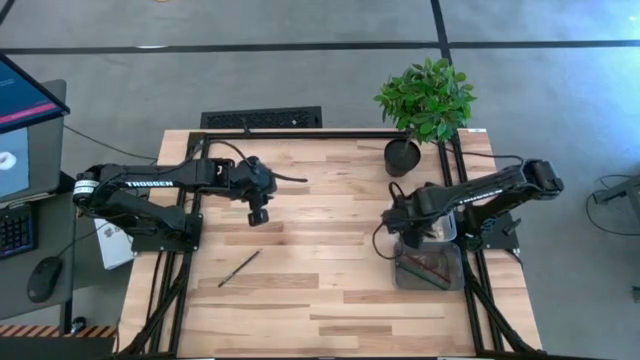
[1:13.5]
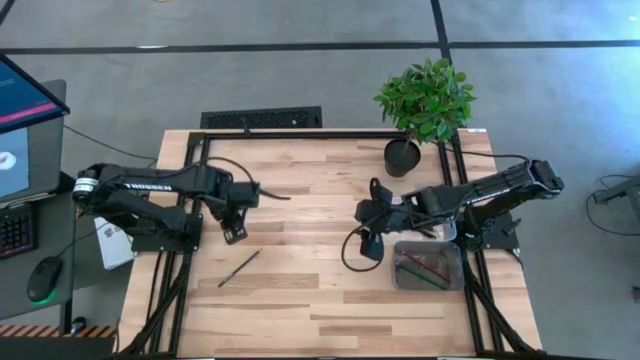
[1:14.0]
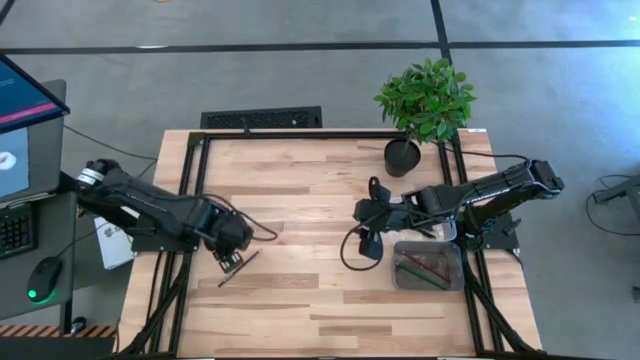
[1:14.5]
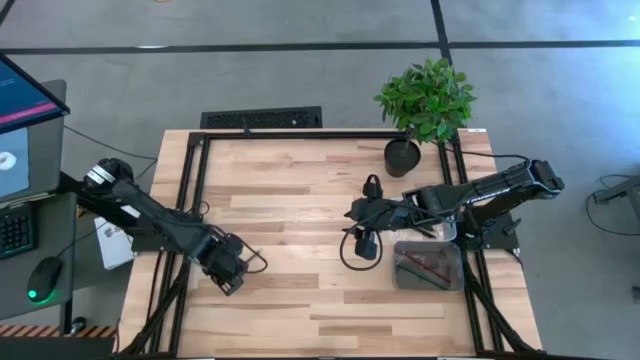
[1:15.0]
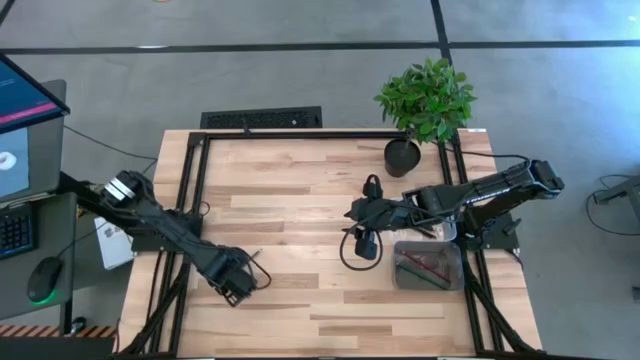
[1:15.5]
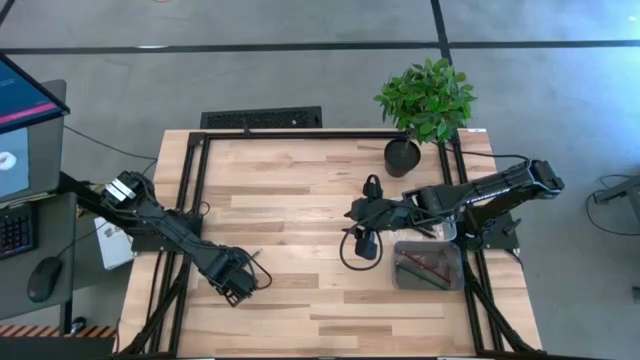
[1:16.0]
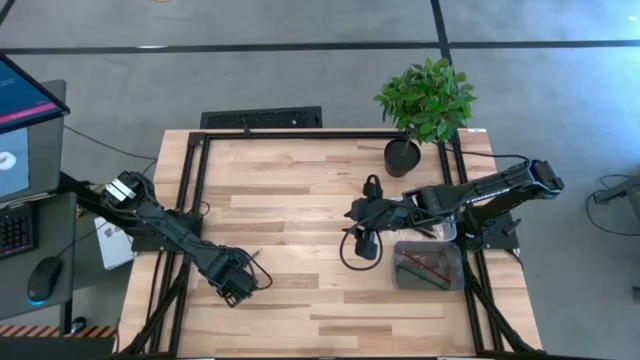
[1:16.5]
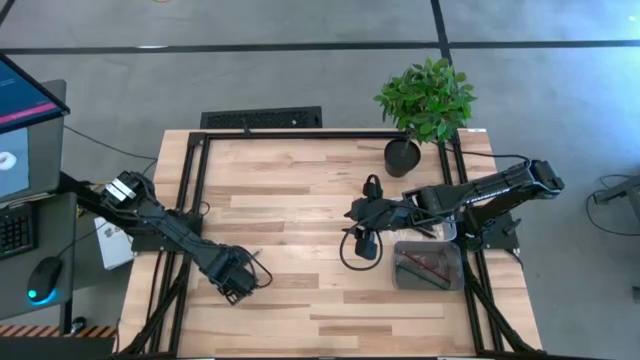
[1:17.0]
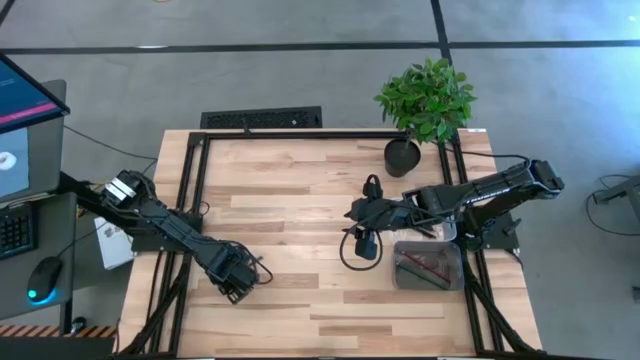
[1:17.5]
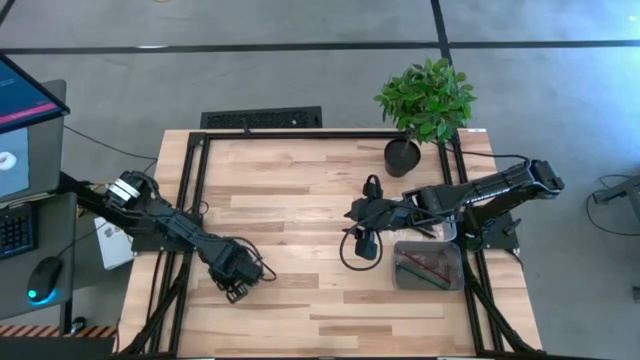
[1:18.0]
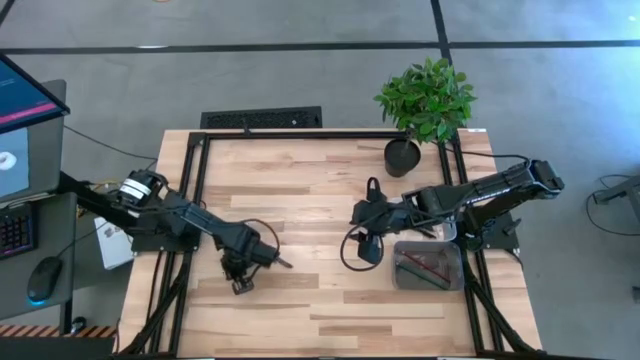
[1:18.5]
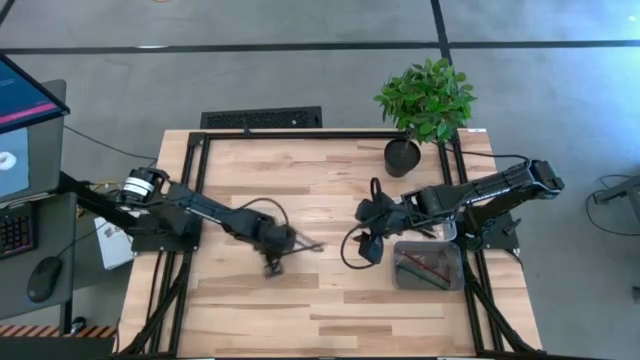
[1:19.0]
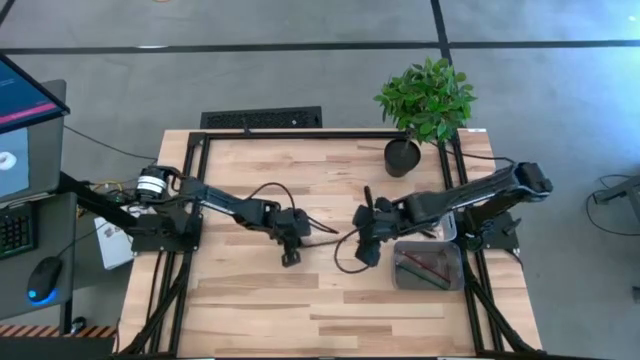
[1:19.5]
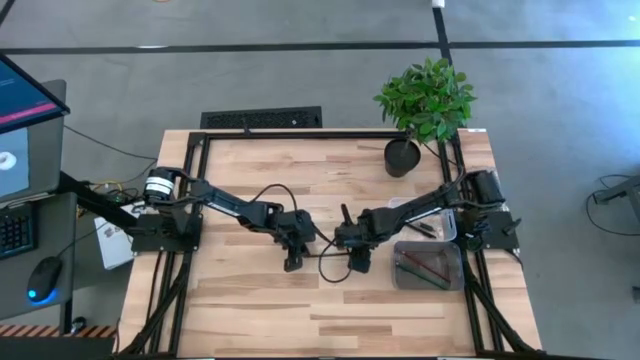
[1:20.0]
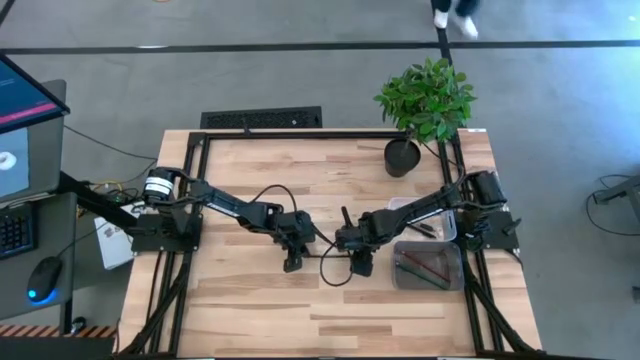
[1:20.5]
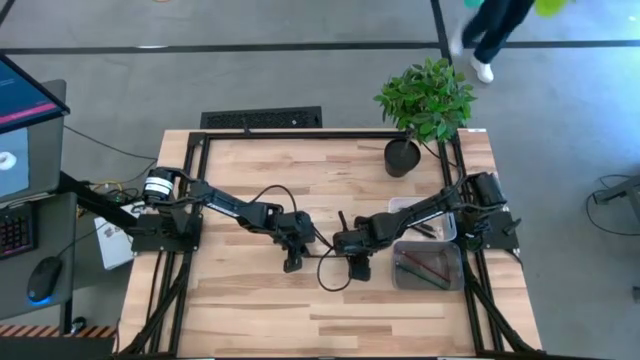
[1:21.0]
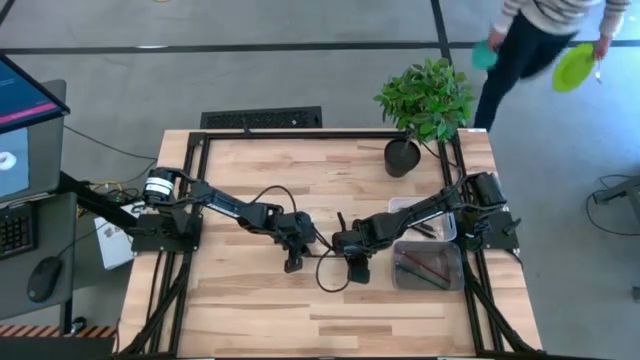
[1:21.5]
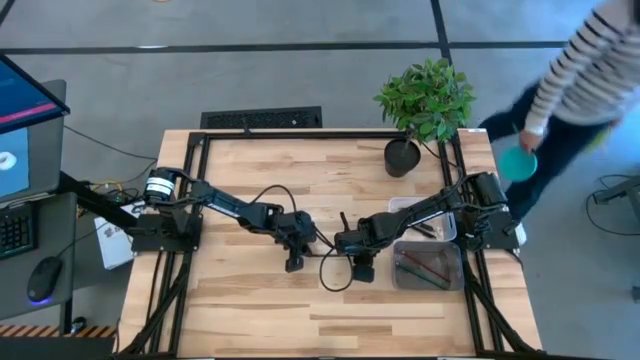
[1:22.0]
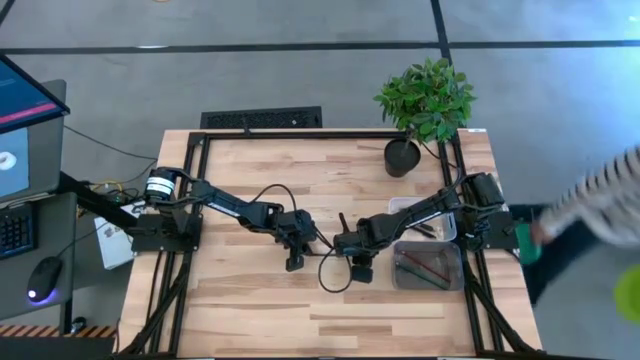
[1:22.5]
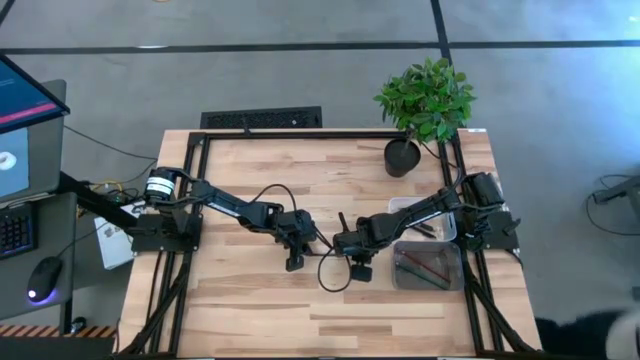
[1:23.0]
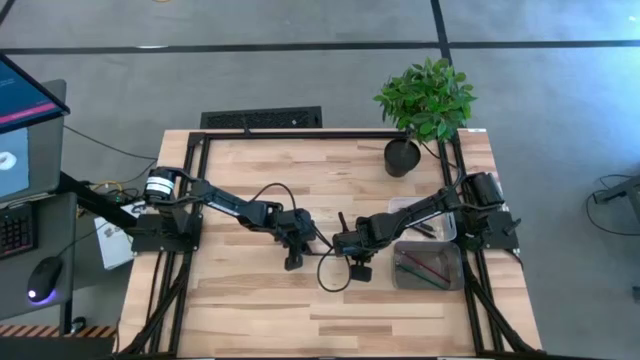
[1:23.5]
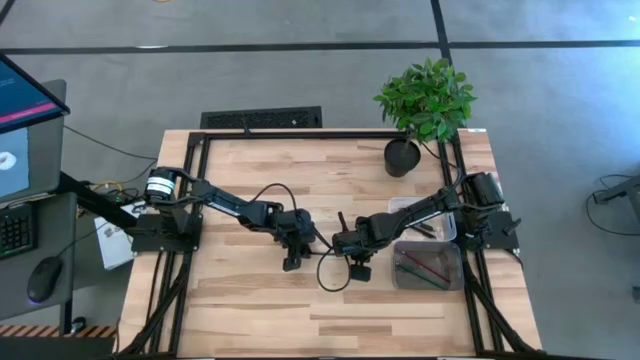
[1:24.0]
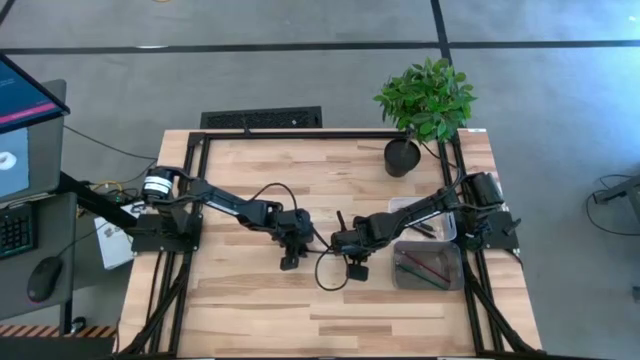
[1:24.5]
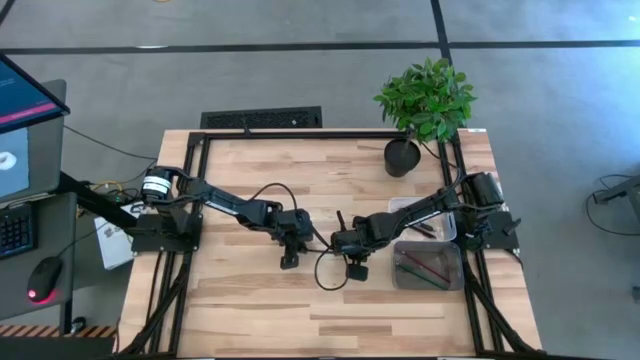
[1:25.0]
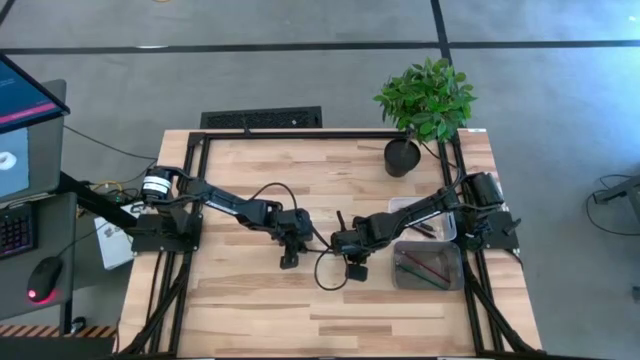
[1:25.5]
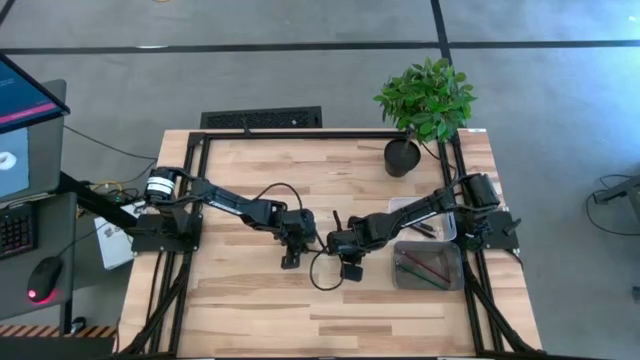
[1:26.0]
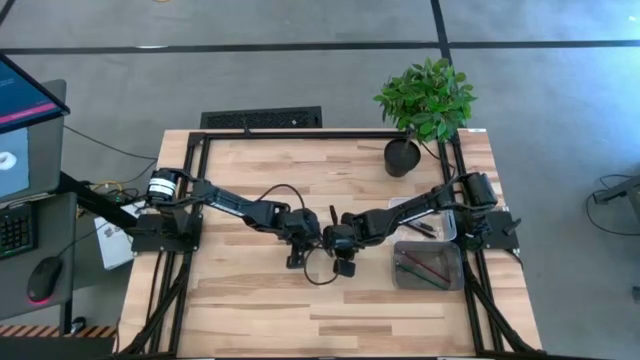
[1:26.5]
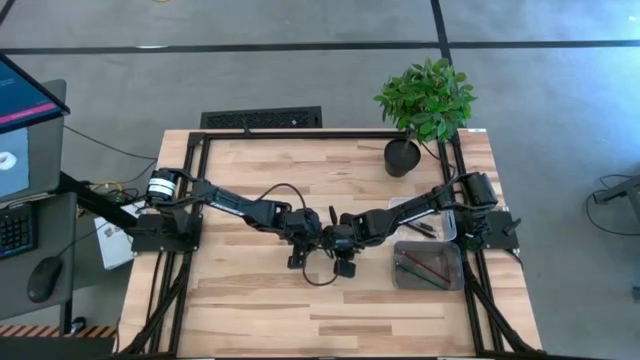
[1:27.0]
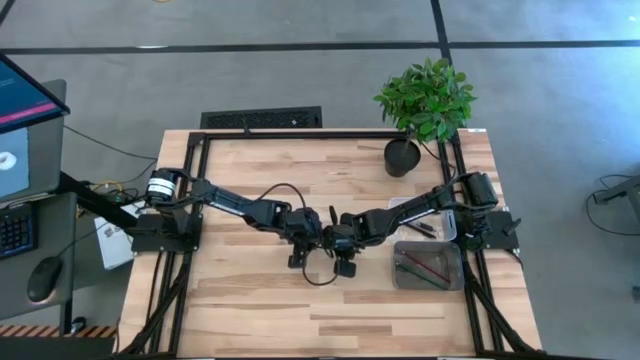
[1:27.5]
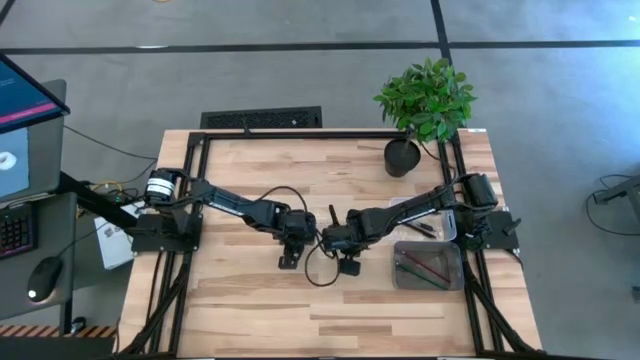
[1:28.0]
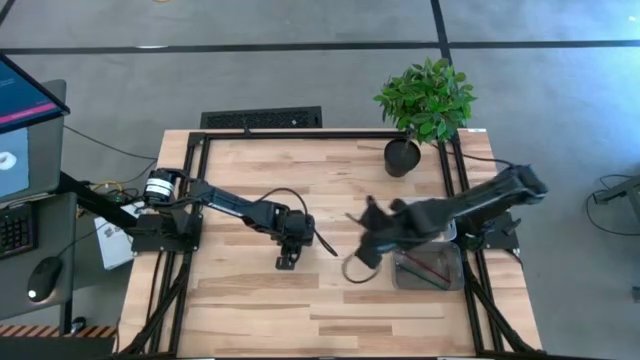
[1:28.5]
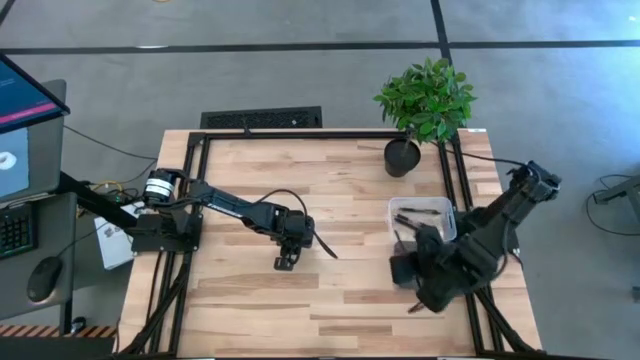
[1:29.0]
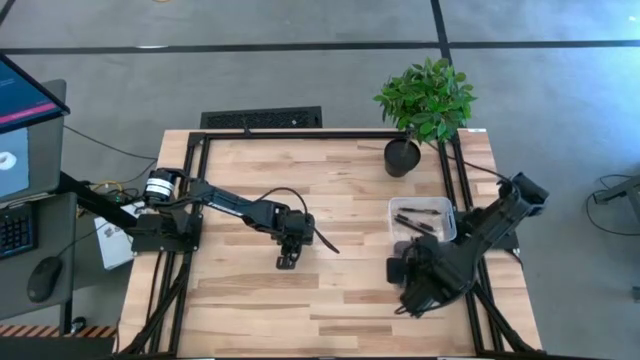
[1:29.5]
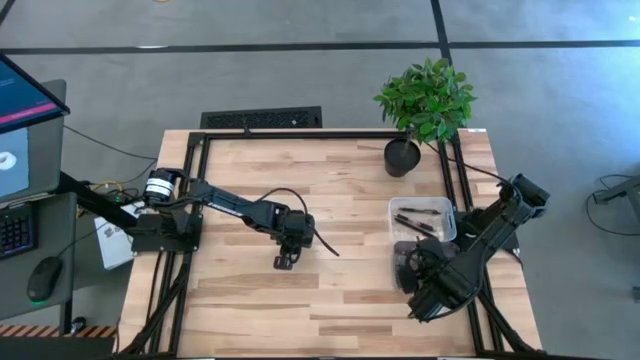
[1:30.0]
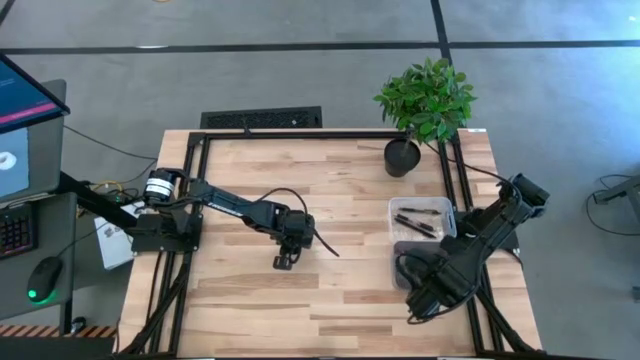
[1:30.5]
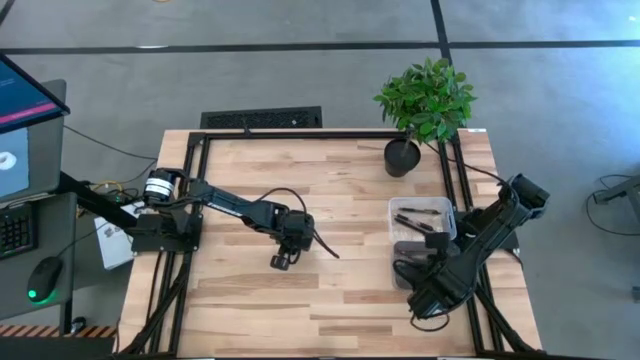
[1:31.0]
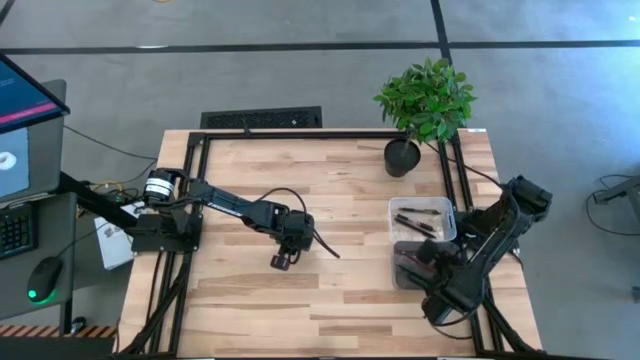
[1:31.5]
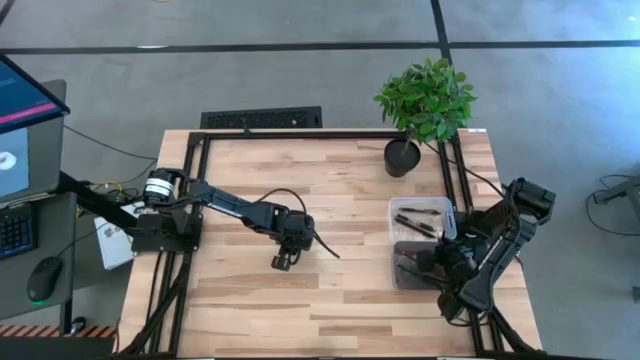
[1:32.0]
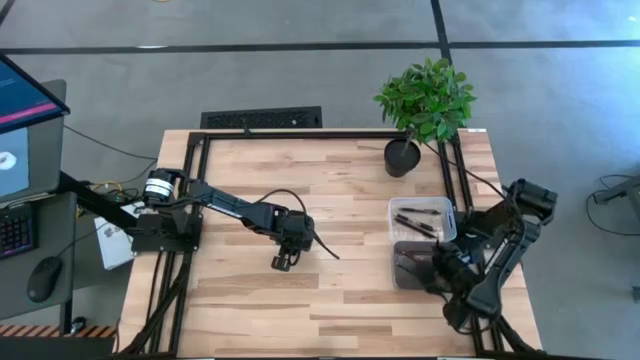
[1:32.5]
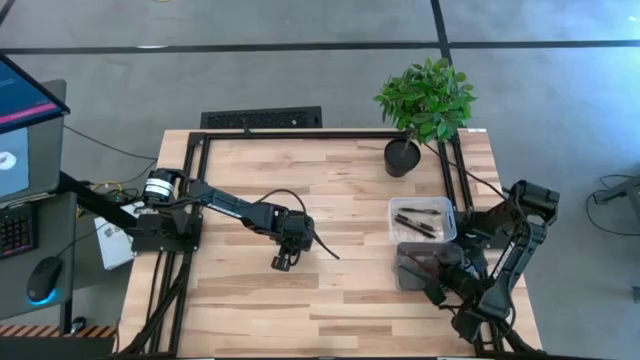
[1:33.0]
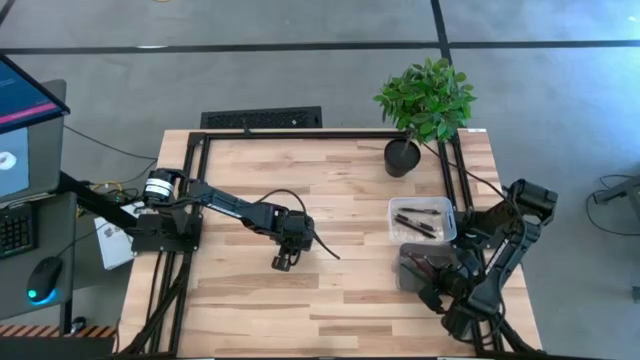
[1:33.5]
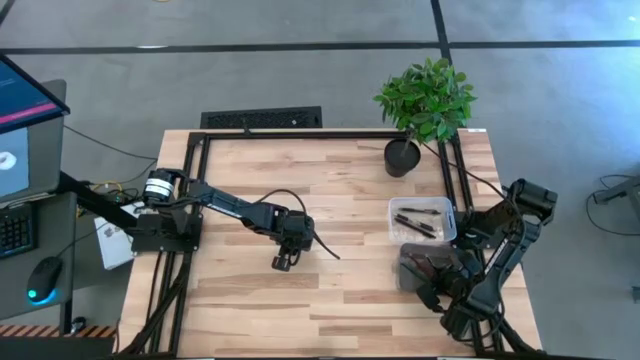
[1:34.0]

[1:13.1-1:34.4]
Task: Sort pens & pencils
Put the black pencil into the black transparent bin
